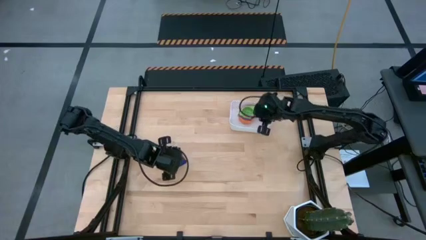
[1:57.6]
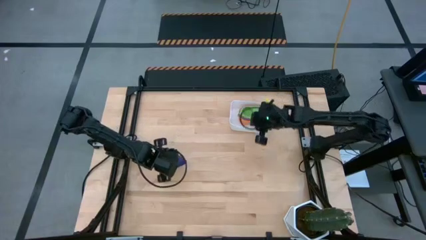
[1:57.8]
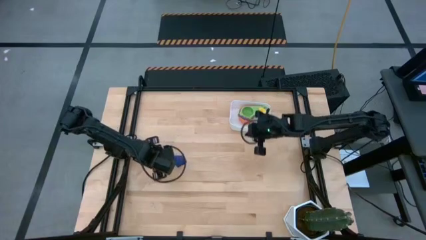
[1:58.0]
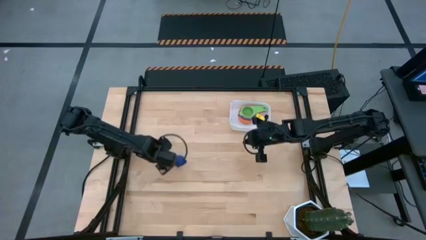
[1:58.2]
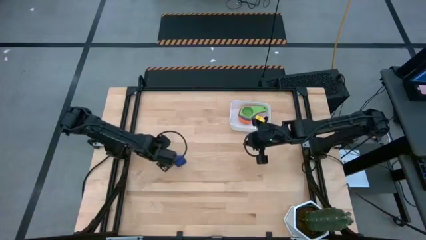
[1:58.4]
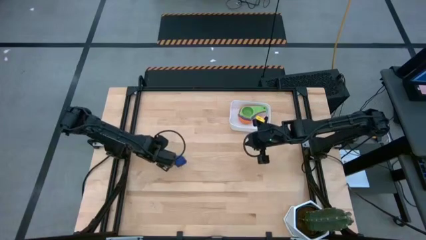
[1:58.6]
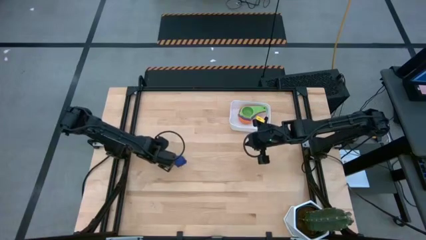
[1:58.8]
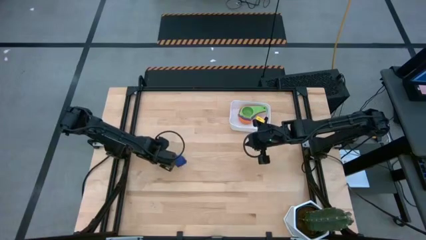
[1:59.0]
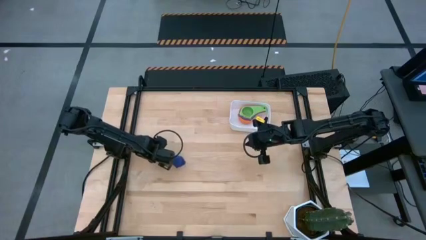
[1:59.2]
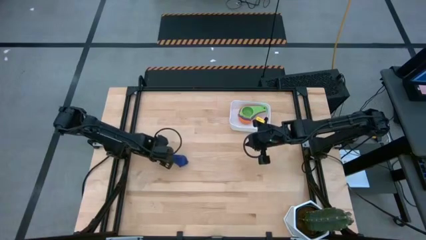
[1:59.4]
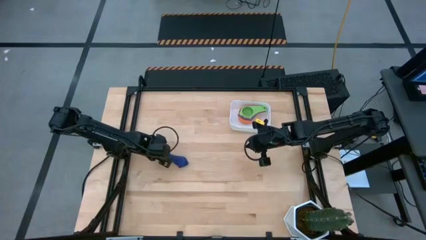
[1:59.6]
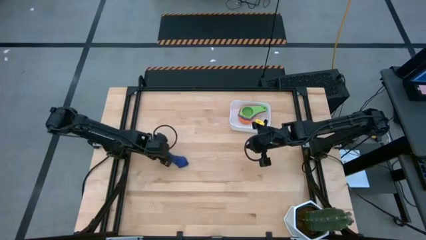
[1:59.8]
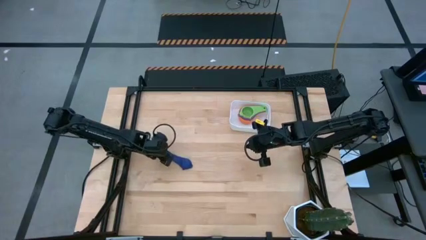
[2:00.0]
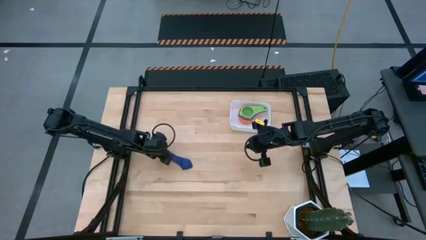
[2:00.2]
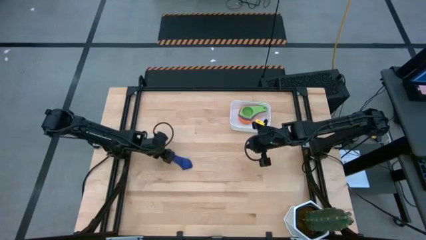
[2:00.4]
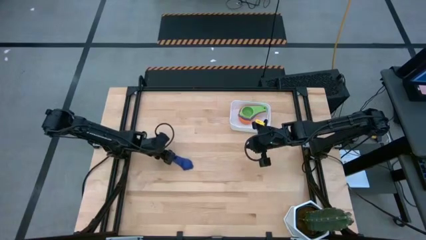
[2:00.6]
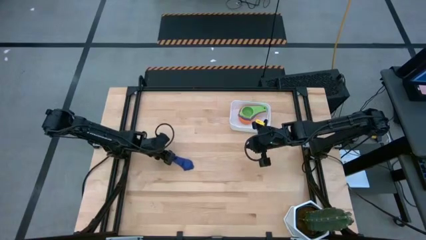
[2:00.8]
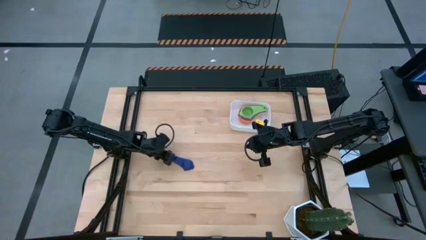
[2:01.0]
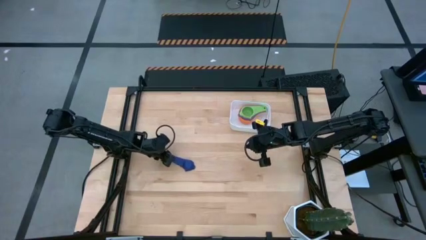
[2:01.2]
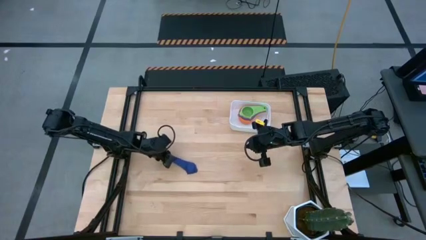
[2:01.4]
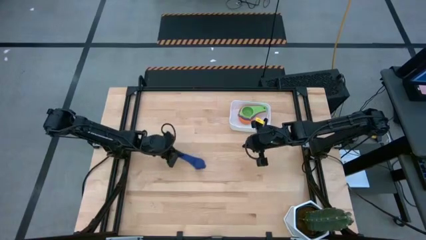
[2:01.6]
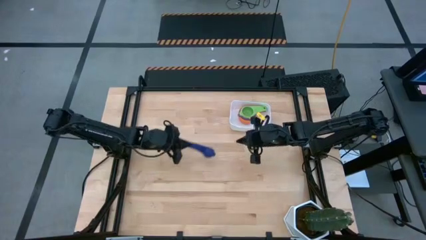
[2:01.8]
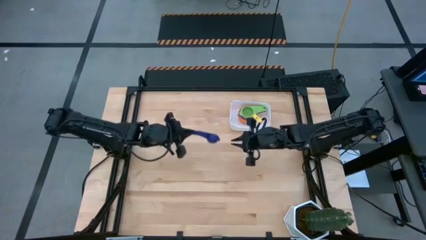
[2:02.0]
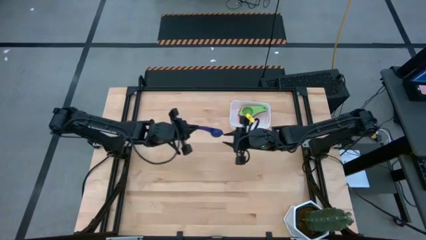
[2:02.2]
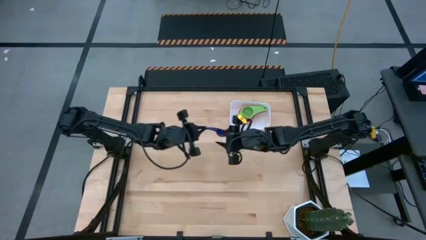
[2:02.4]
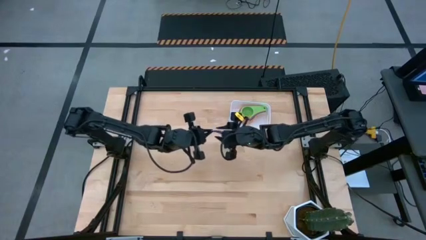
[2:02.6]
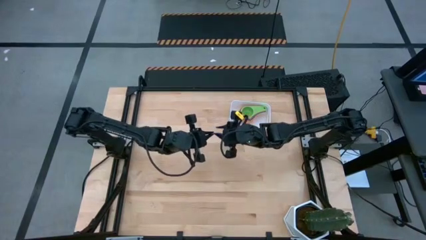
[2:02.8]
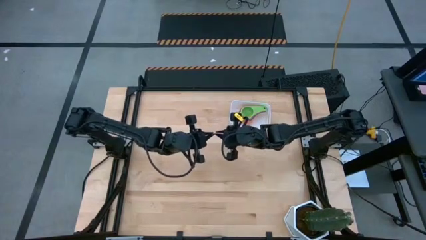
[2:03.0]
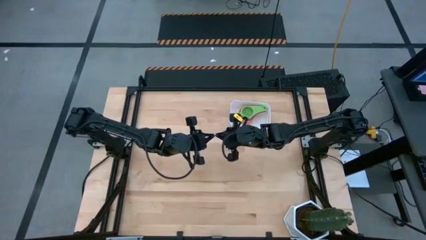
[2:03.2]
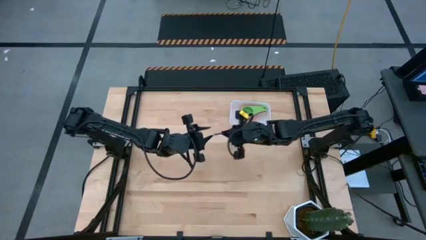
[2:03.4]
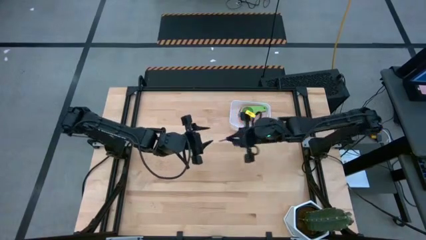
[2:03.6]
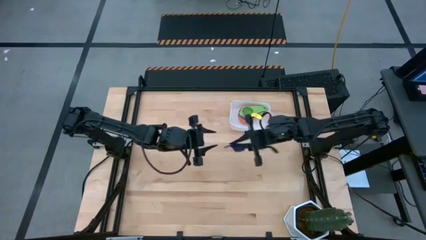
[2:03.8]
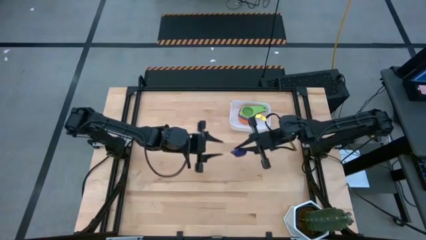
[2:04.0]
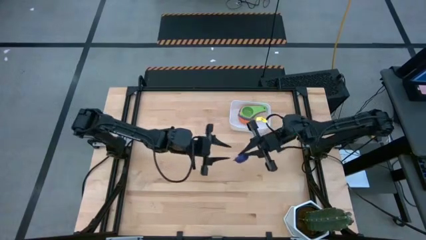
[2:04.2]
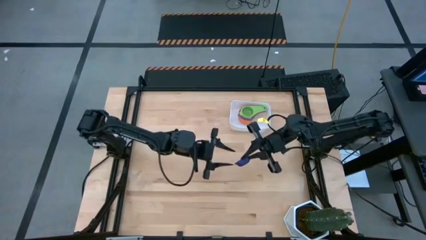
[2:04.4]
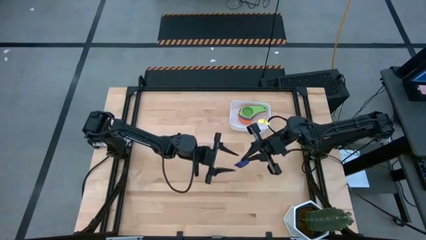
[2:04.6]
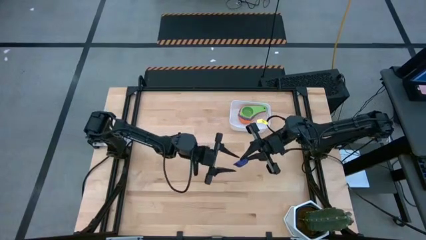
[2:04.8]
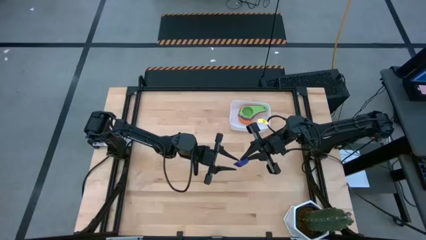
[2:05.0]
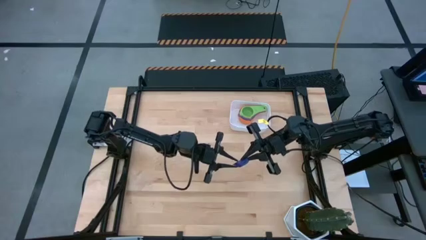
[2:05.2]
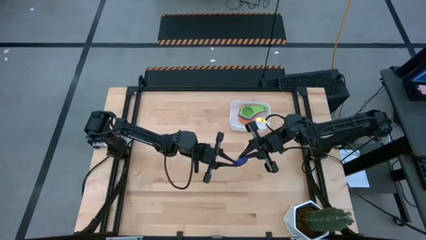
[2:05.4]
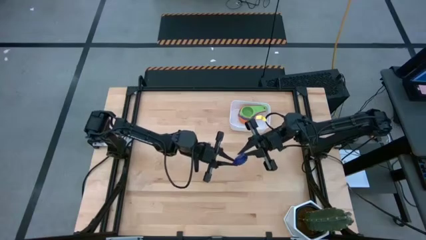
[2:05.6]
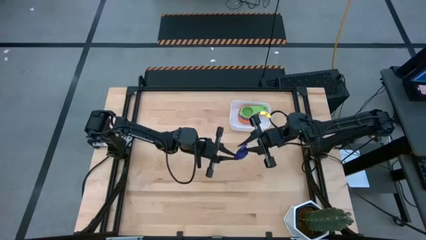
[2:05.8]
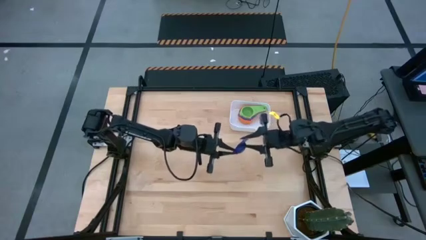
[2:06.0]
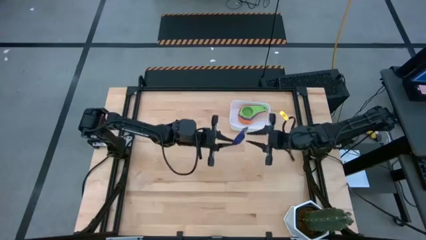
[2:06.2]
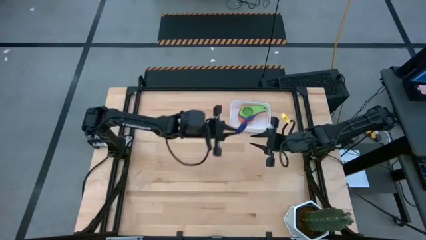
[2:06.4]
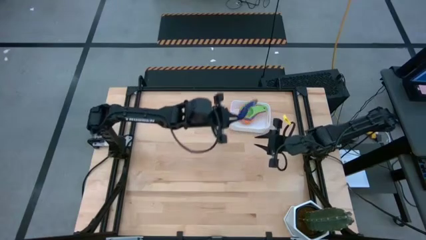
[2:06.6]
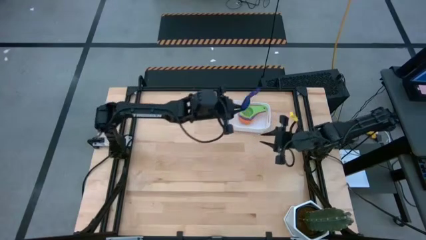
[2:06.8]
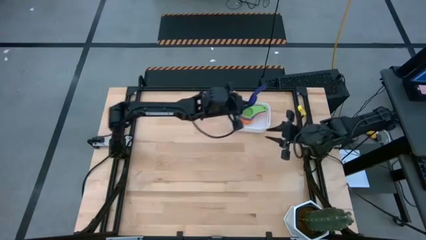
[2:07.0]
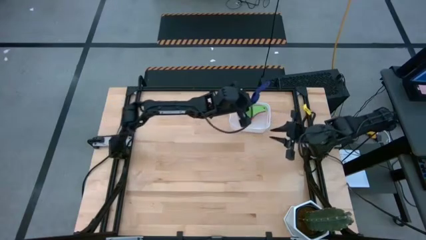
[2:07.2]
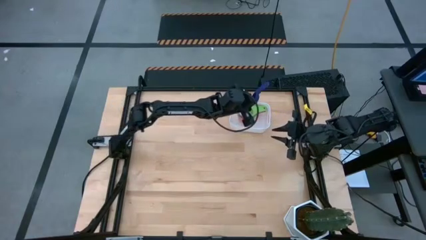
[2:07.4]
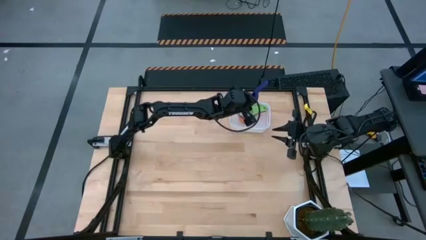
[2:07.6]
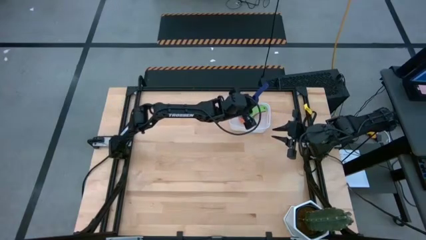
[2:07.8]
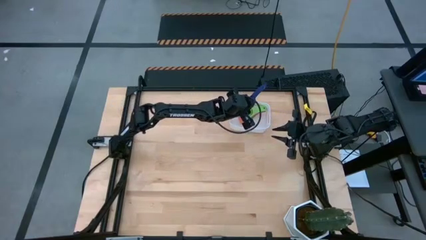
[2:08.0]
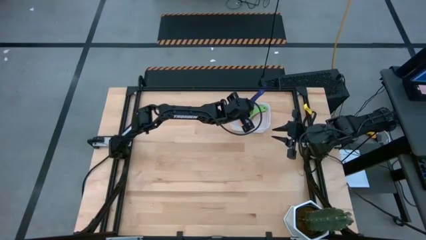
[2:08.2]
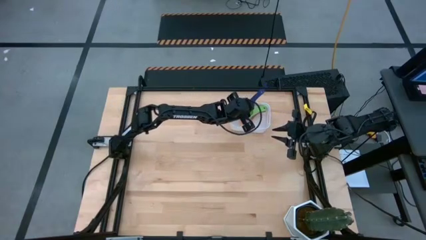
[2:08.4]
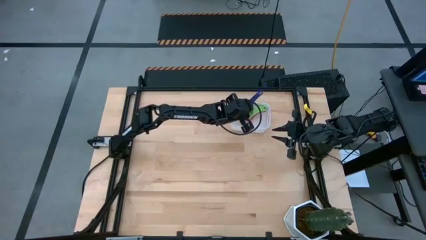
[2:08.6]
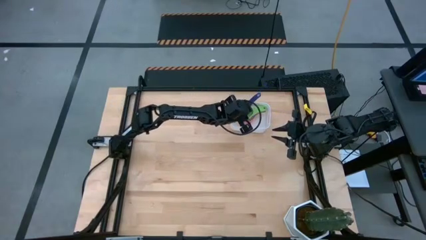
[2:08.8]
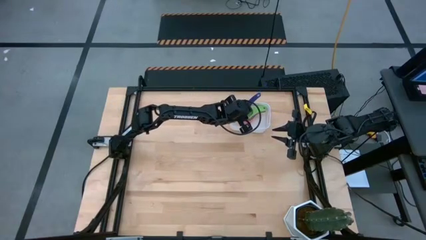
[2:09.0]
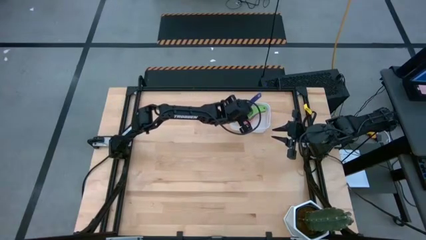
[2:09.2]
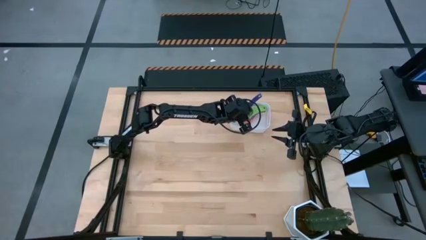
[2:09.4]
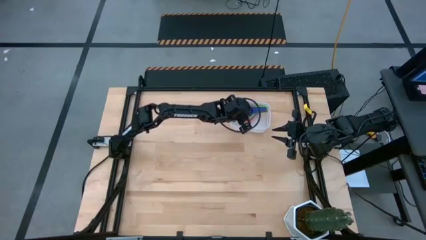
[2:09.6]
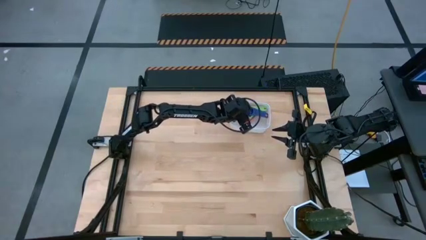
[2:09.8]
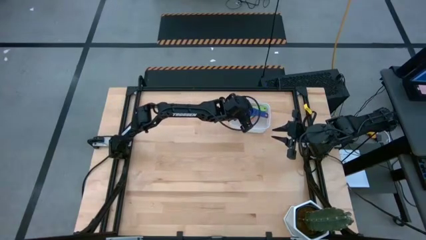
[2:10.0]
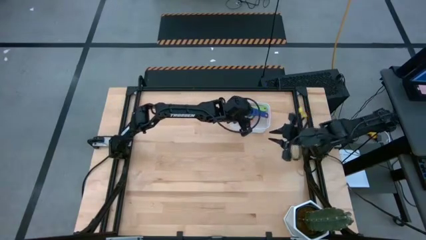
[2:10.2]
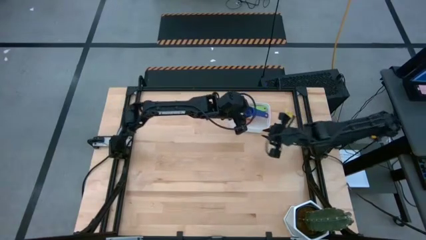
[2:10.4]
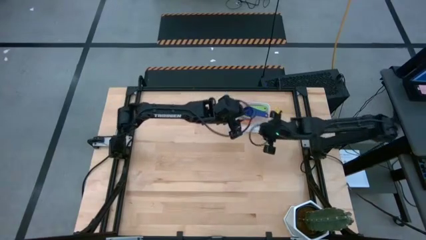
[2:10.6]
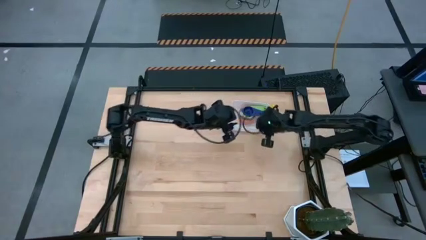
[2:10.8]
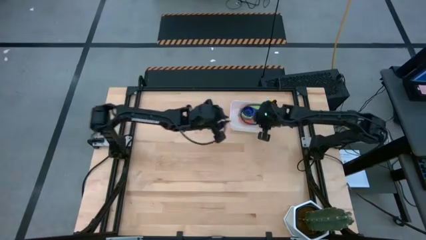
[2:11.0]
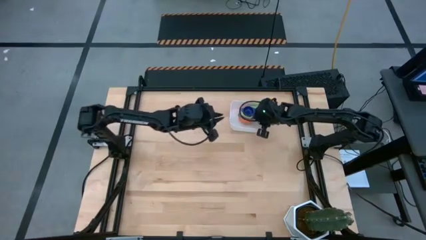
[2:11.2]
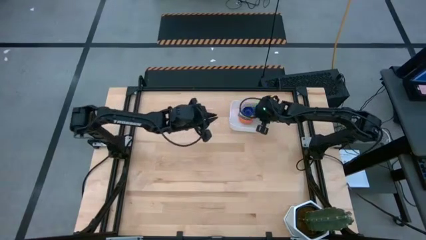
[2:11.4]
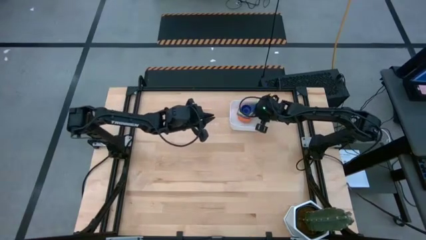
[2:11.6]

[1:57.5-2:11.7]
Task: Nest measuring cups in basket
Stack the purple measuring cup on top of the green measuring cup in the white bin
